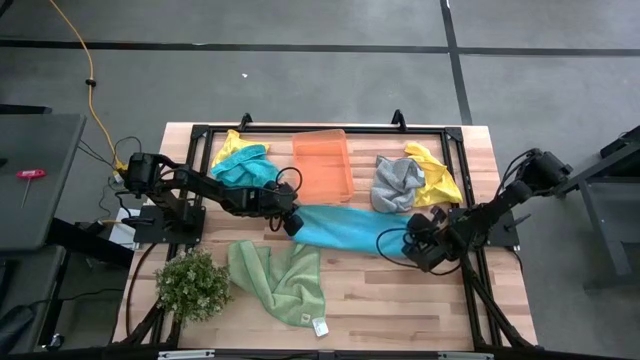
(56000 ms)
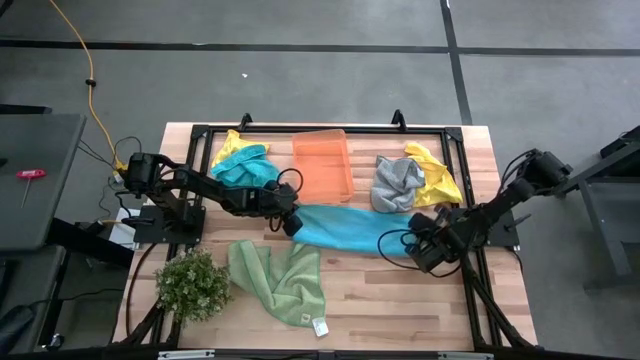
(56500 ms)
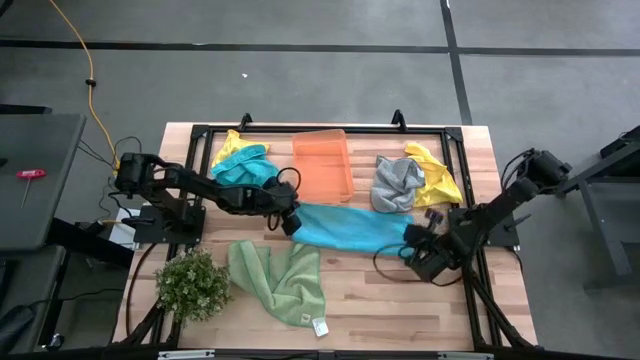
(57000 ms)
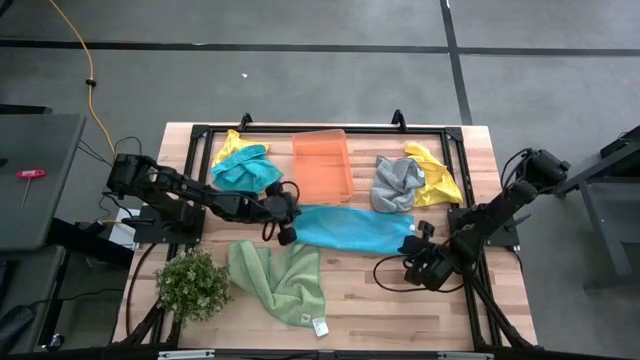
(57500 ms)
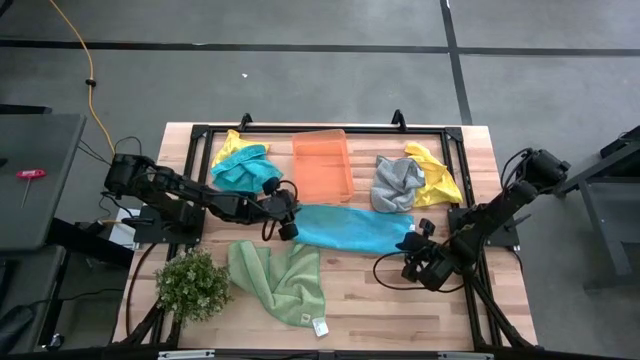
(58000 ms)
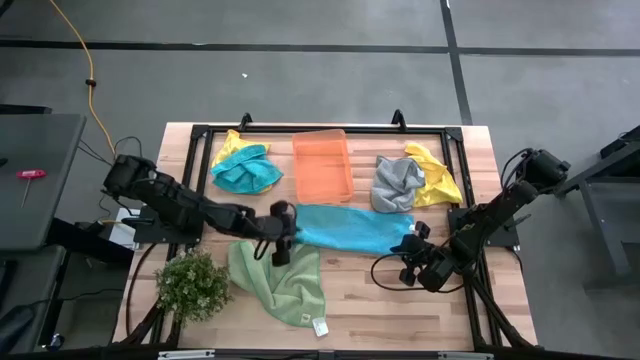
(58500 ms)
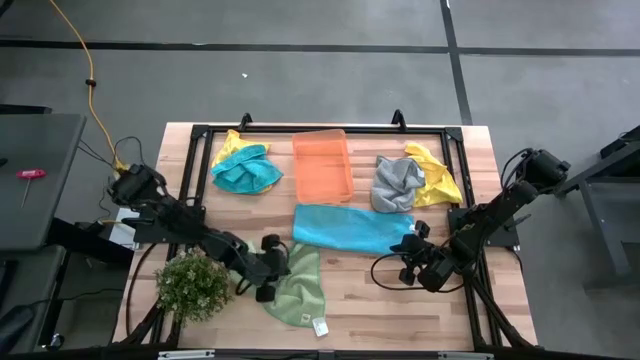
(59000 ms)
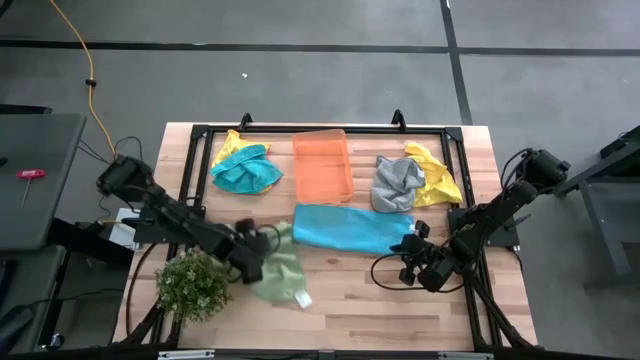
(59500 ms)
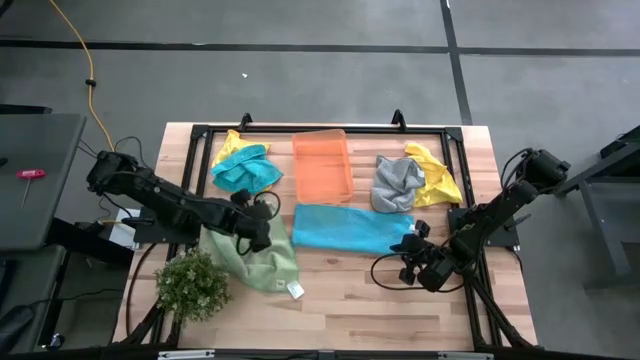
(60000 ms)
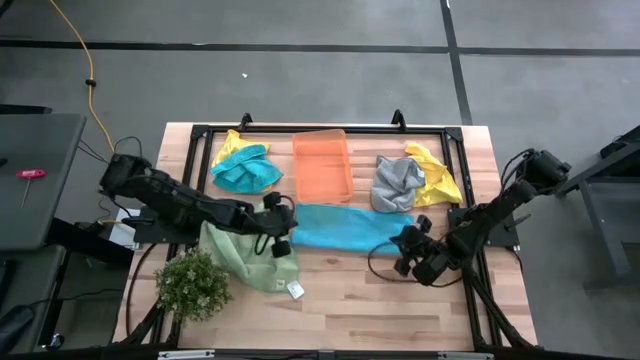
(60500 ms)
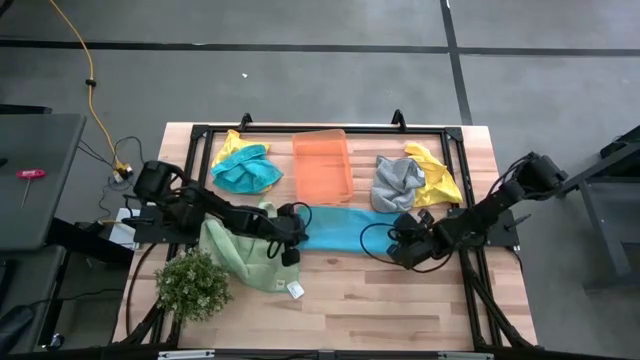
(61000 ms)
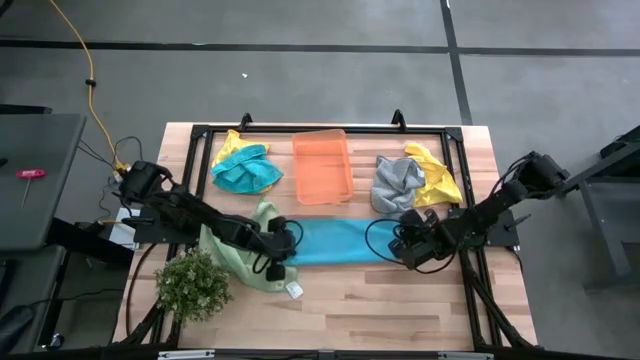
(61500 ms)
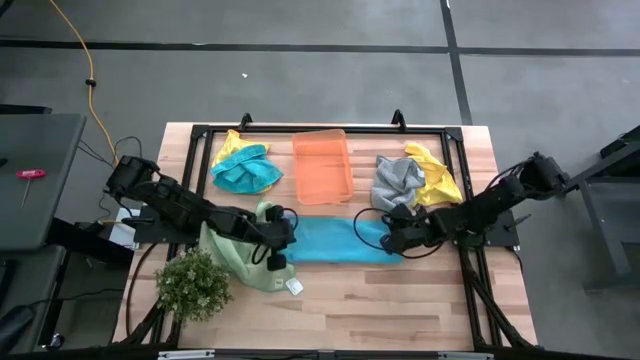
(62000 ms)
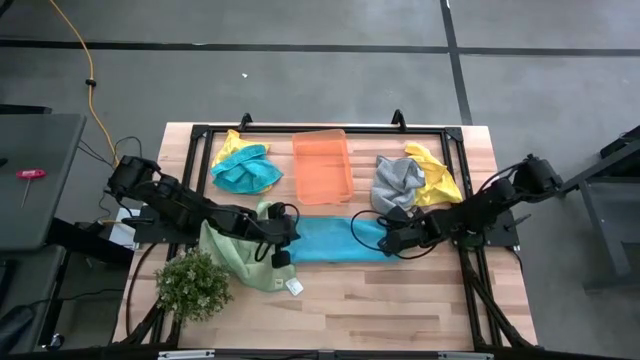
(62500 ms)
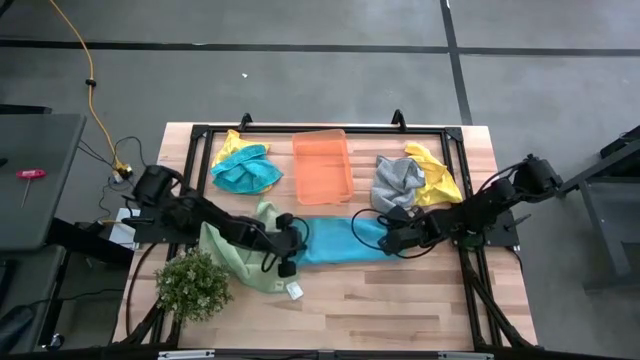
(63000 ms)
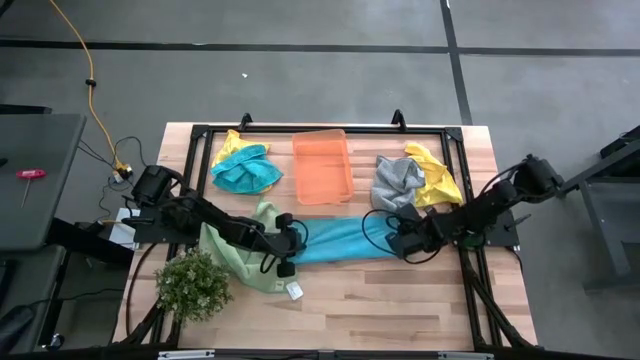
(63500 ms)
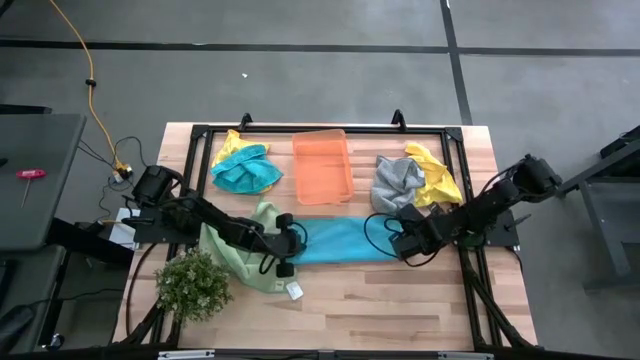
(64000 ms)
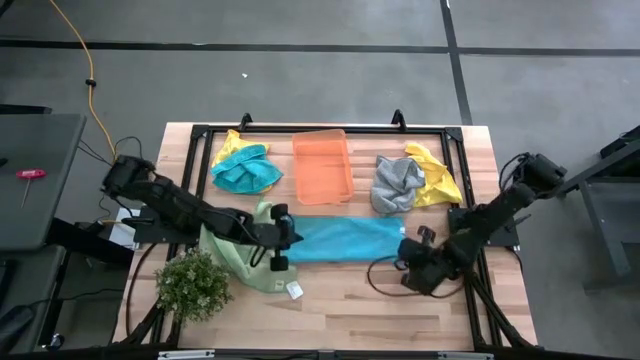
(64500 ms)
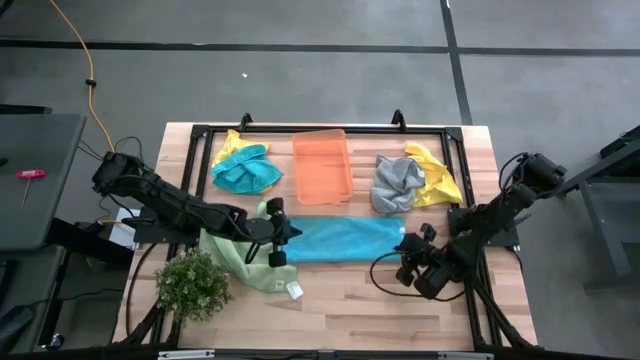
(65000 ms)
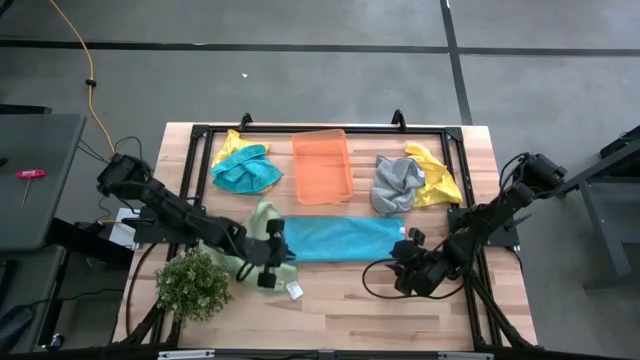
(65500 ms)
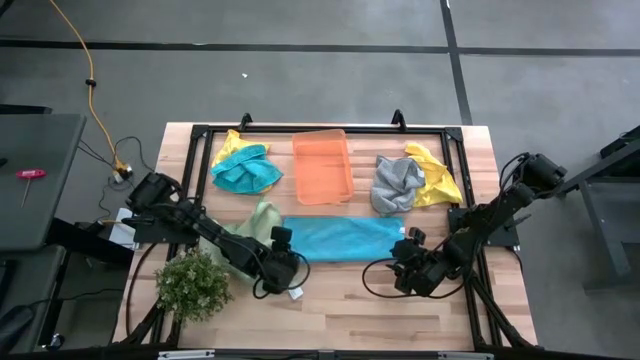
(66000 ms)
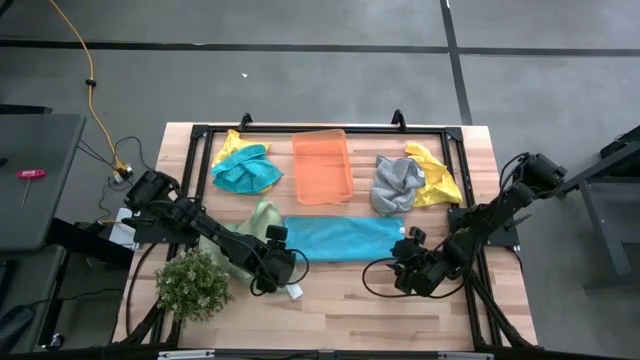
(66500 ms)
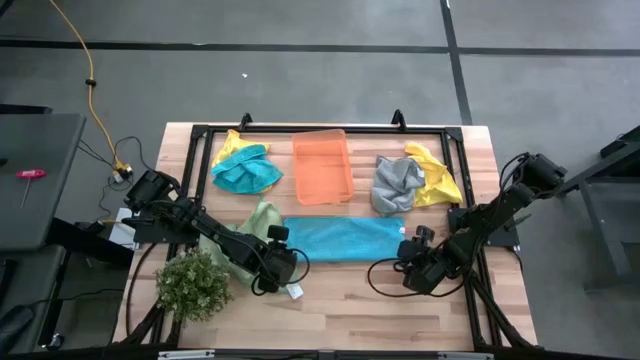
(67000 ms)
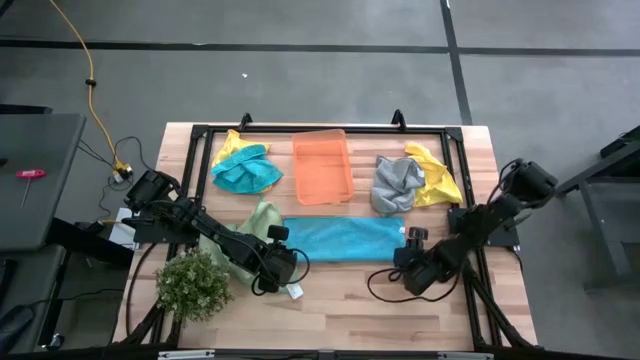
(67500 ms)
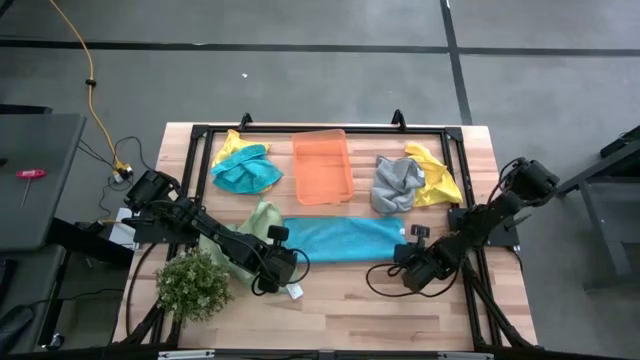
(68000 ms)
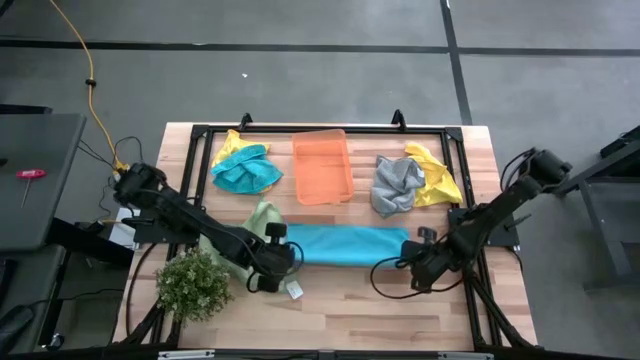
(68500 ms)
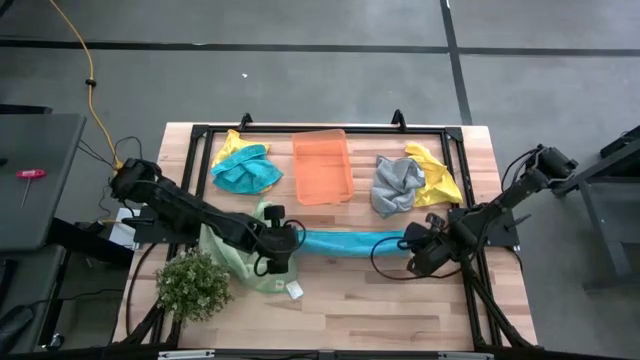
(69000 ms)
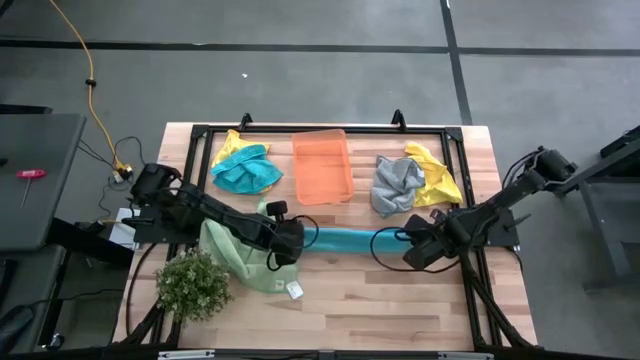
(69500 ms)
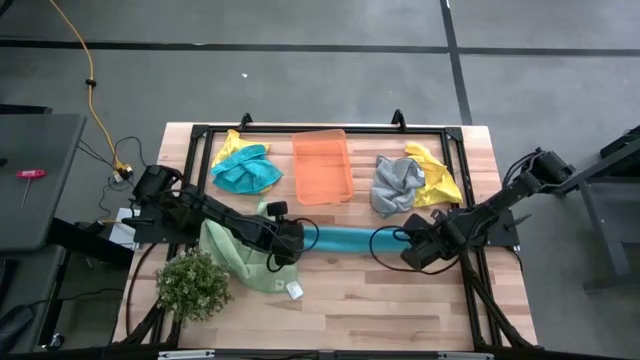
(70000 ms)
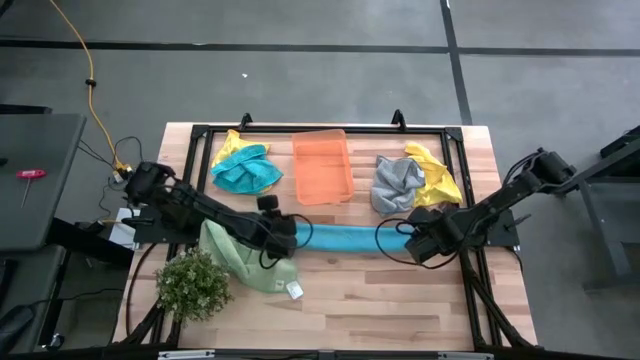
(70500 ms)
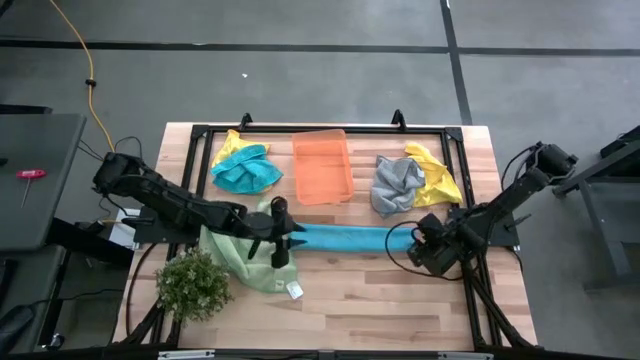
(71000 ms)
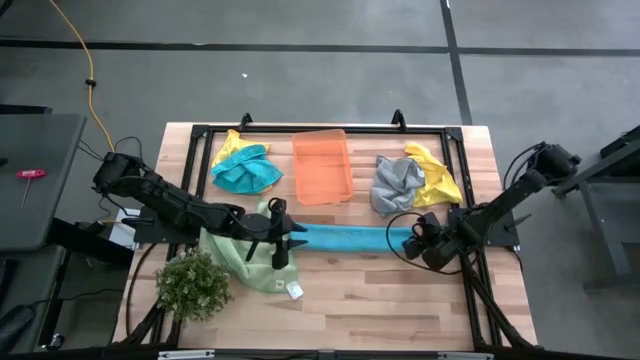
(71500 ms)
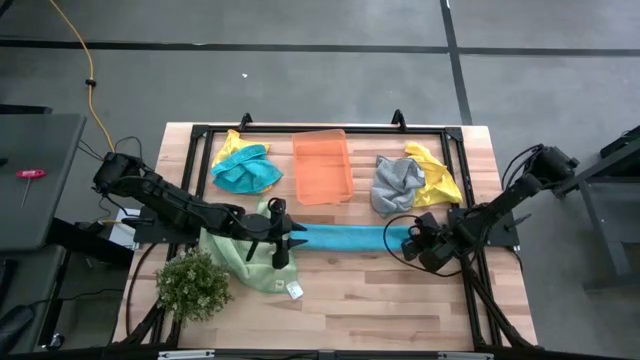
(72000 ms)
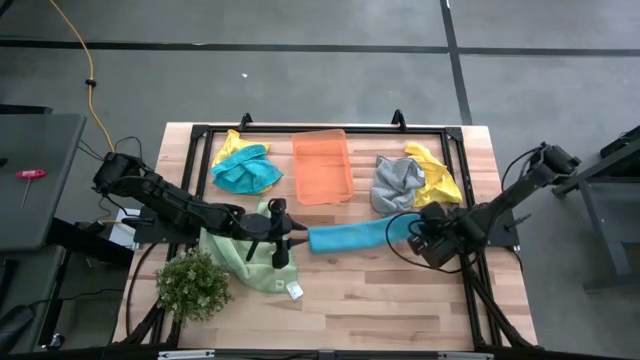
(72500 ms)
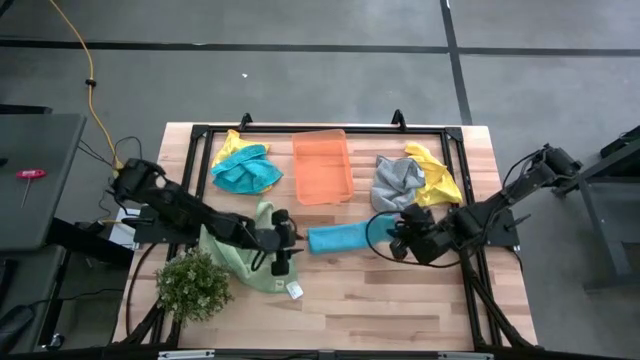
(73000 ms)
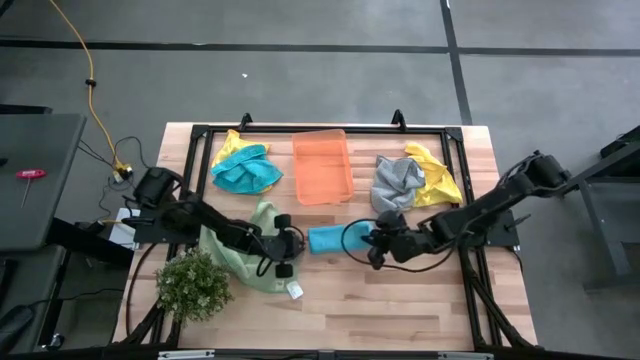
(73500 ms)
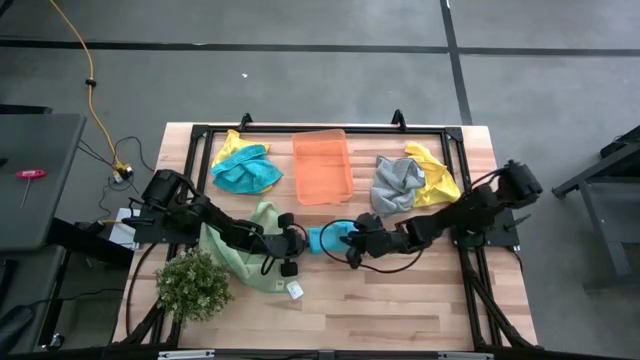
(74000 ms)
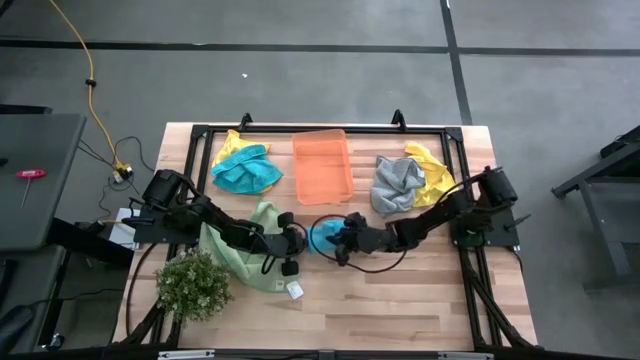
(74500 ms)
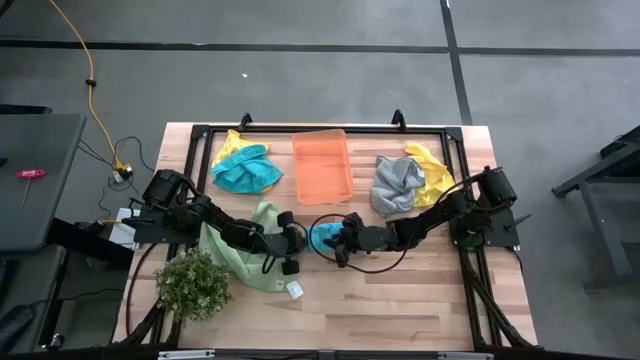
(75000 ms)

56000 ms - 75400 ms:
Task: Fold microfiber towels
Fold the bottom blue microfiber cloth
